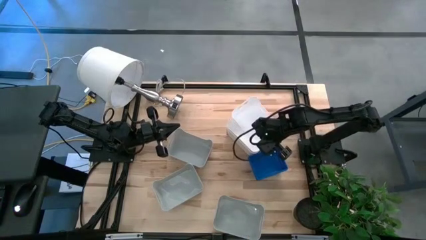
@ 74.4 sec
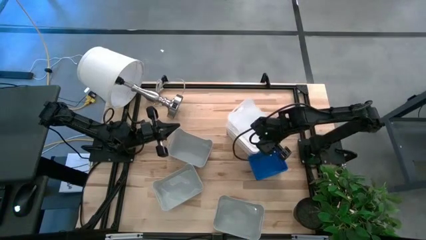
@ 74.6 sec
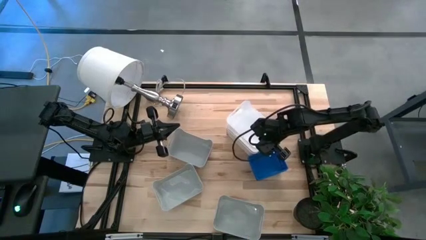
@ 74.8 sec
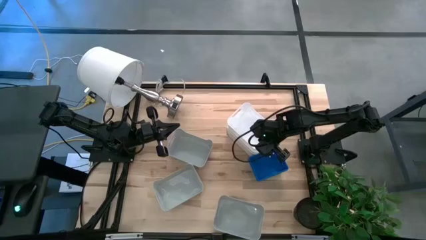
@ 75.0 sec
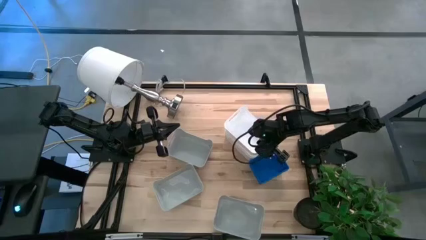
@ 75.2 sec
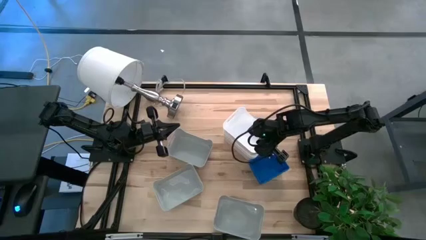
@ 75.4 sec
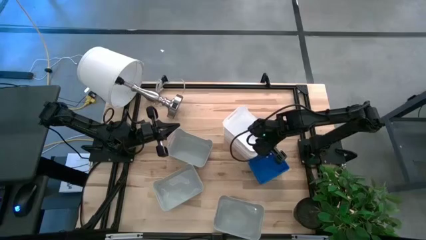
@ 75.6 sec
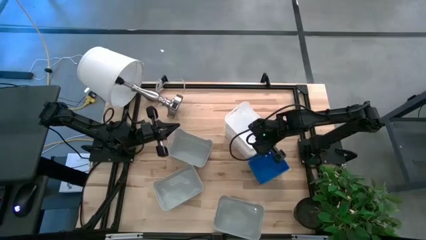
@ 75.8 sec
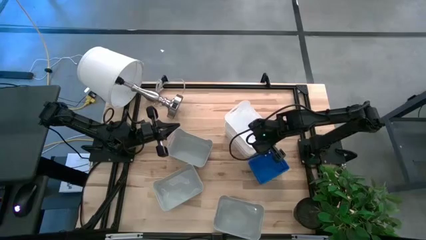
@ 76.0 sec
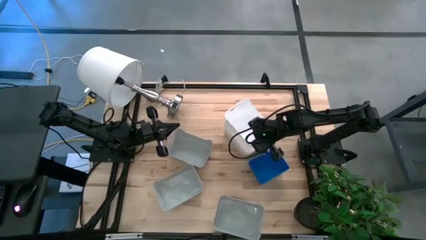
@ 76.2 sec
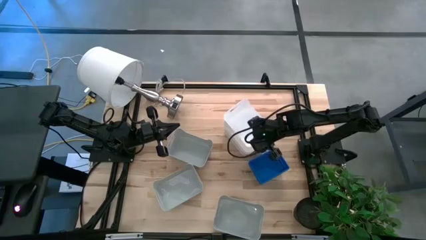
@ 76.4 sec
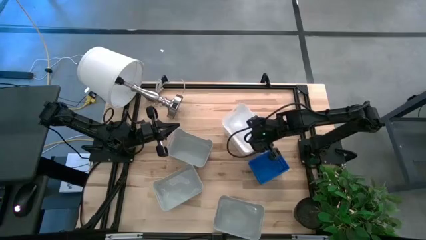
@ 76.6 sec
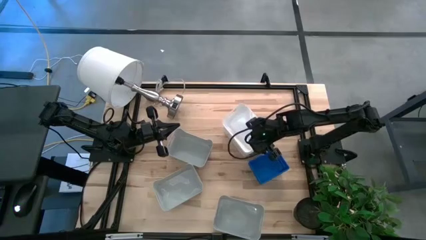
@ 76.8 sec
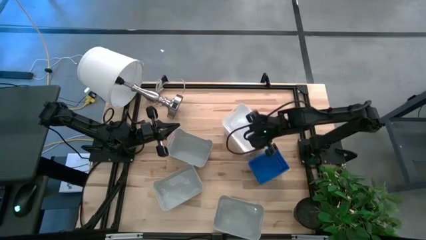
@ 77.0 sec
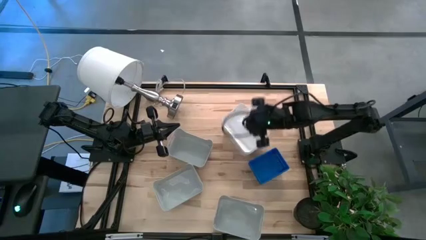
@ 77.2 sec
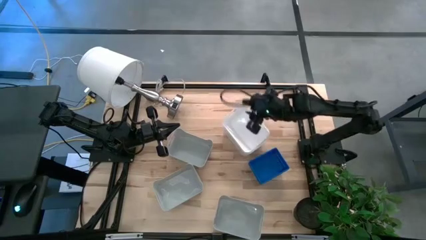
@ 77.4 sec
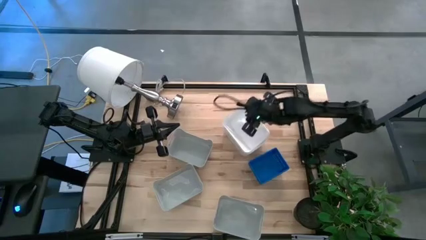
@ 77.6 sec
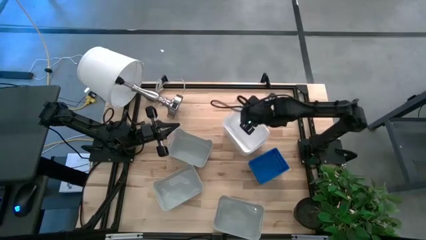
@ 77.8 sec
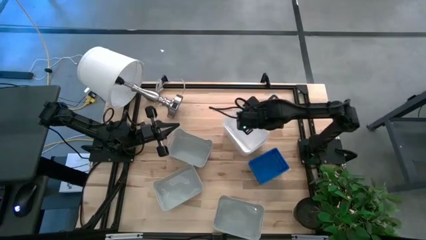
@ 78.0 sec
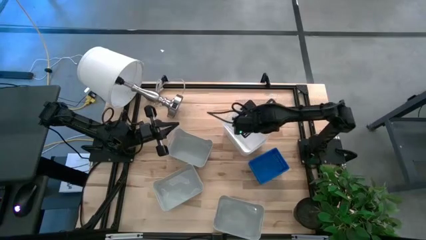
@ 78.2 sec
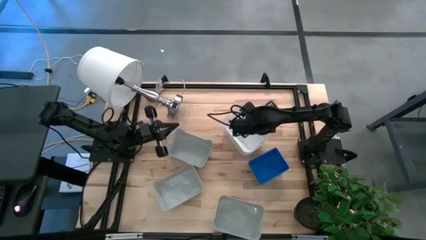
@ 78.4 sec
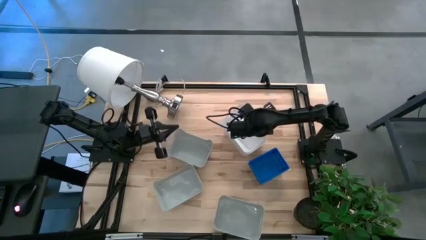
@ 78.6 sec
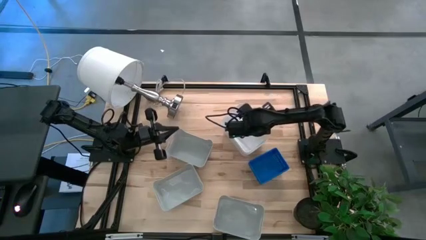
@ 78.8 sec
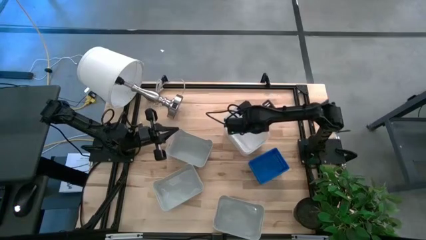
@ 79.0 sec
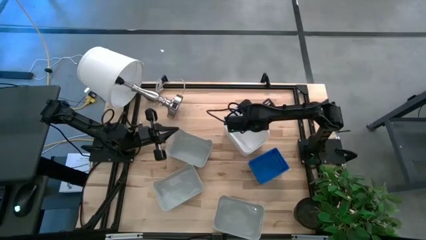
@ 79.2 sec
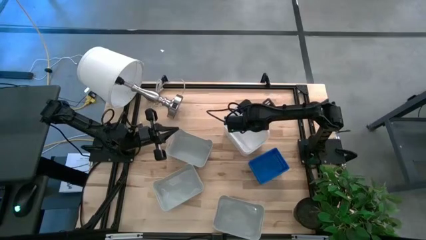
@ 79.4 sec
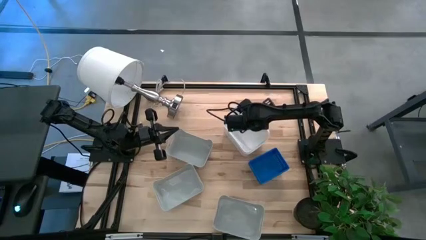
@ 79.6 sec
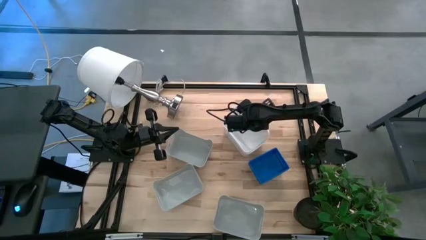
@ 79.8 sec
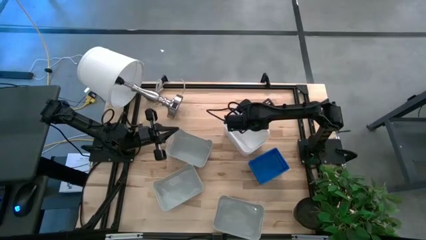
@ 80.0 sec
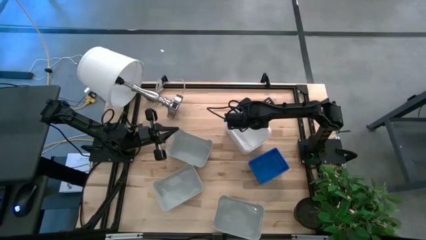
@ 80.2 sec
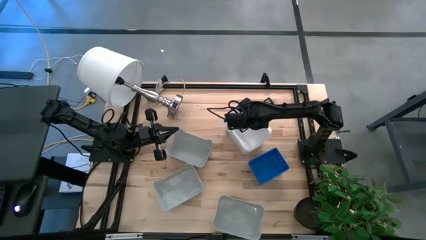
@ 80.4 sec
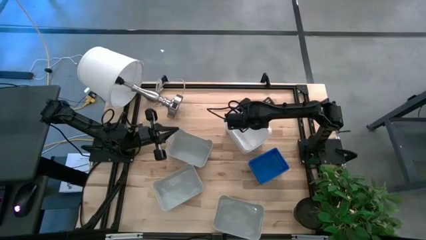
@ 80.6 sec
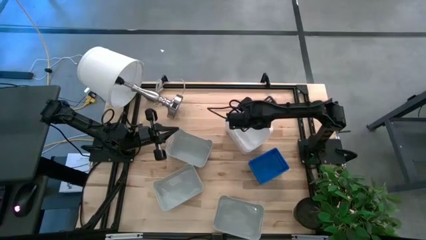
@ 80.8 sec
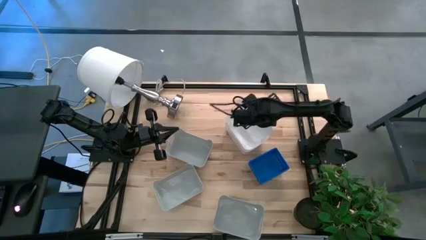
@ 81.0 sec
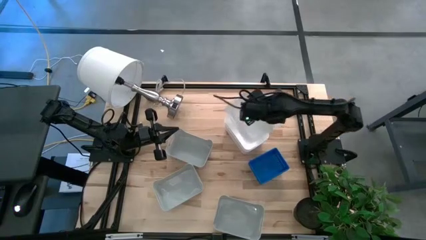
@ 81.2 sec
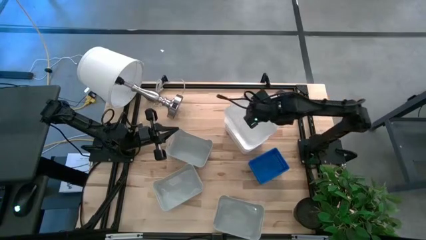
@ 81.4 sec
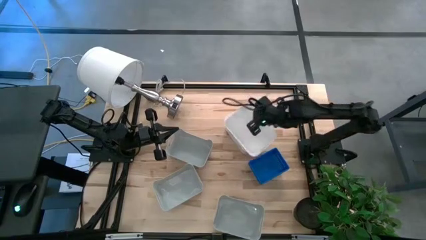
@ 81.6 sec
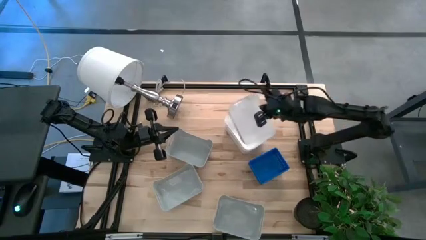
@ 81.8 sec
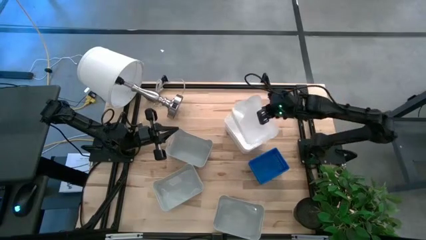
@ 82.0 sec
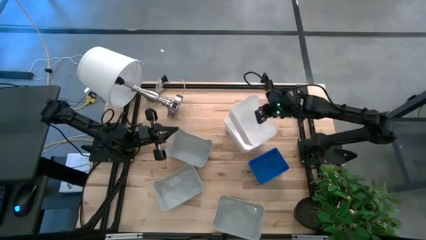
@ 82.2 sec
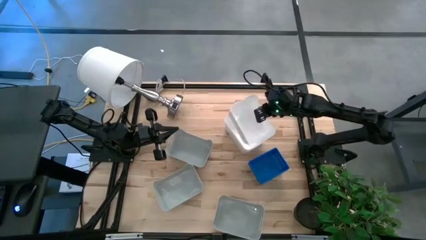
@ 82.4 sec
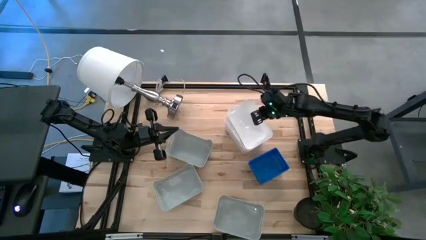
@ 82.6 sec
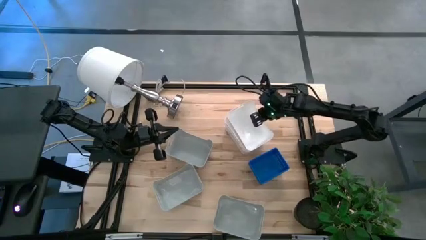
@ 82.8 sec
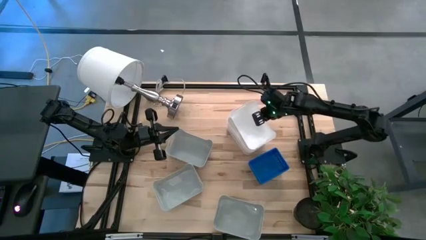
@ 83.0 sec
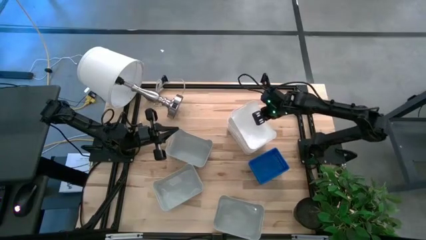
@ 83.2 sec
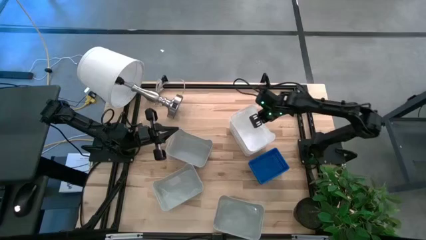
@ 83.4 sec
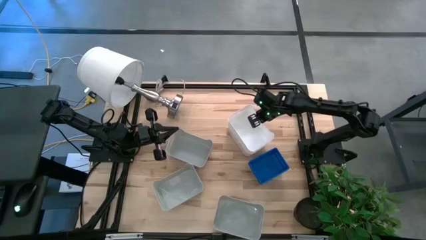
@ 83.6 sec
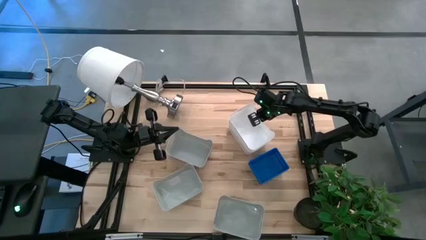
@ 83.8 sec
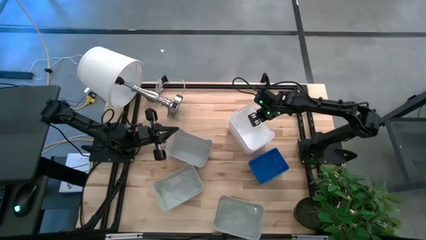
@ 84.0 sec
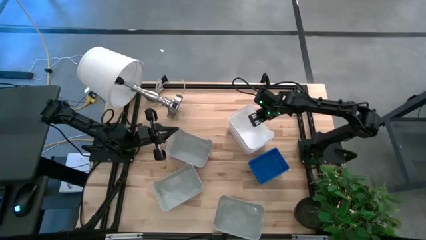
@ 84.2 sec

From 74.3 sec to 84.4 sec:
Stack the top white bin on top of the white bin
